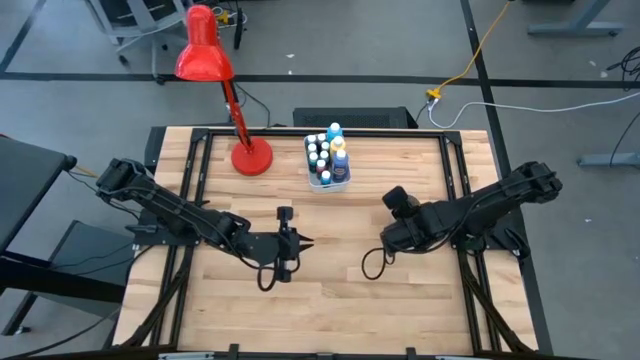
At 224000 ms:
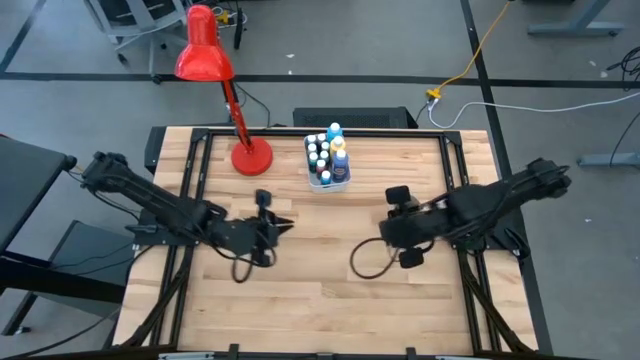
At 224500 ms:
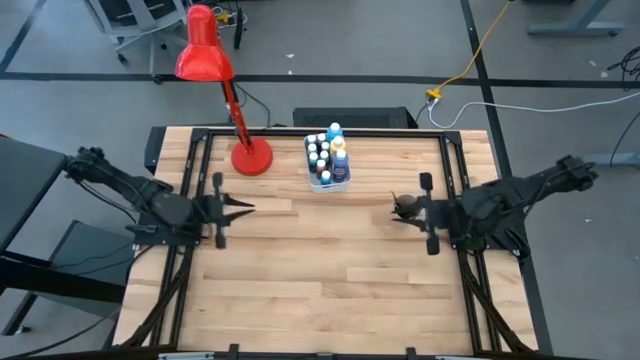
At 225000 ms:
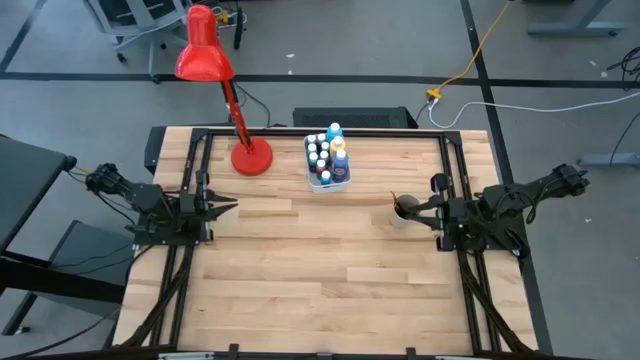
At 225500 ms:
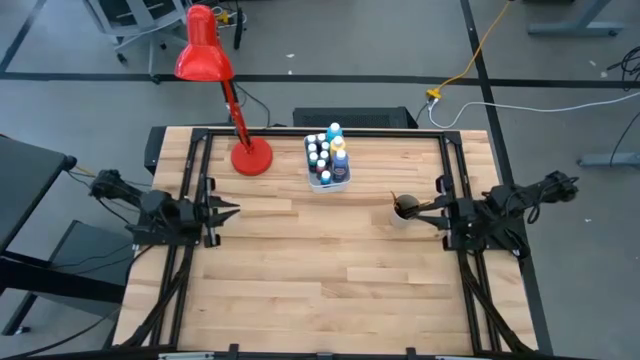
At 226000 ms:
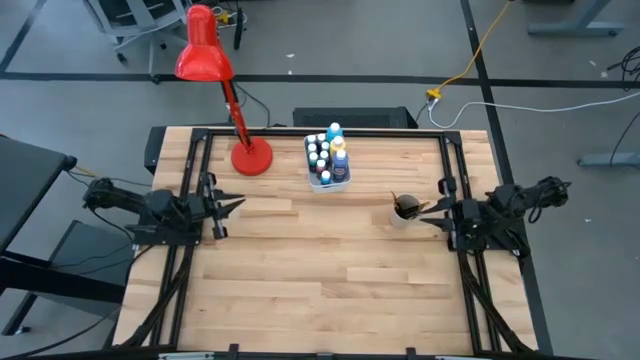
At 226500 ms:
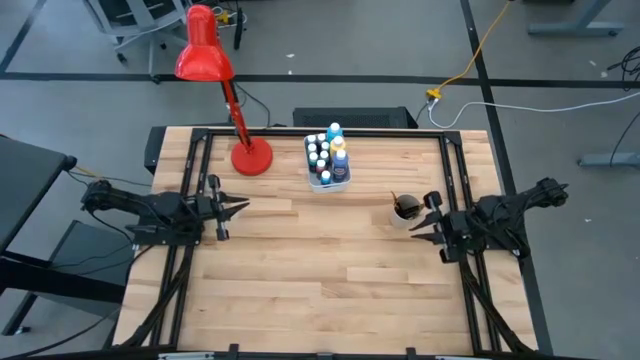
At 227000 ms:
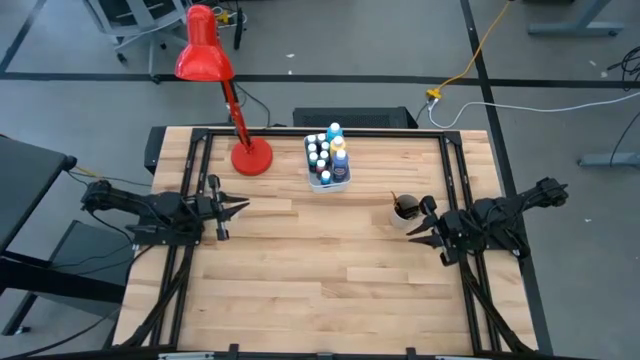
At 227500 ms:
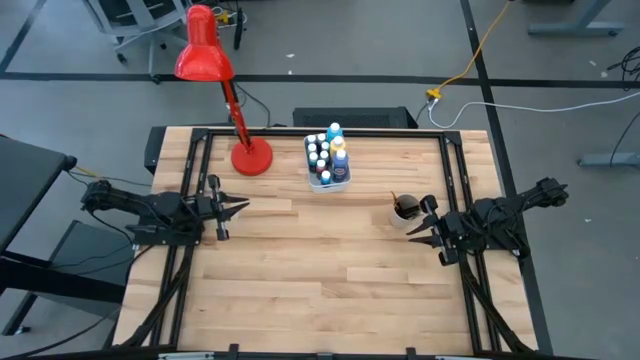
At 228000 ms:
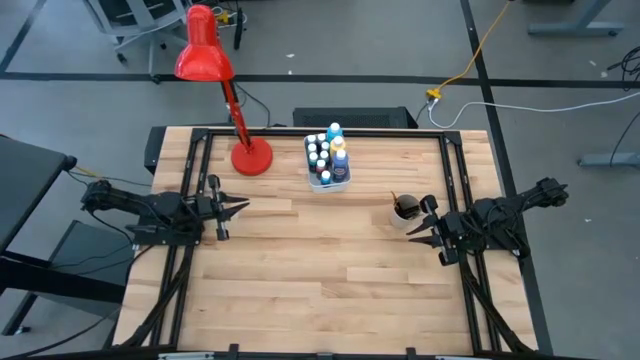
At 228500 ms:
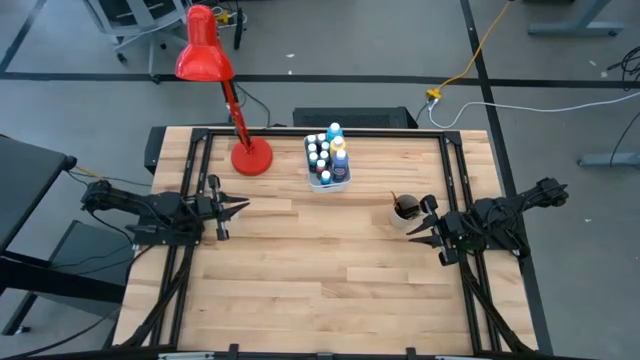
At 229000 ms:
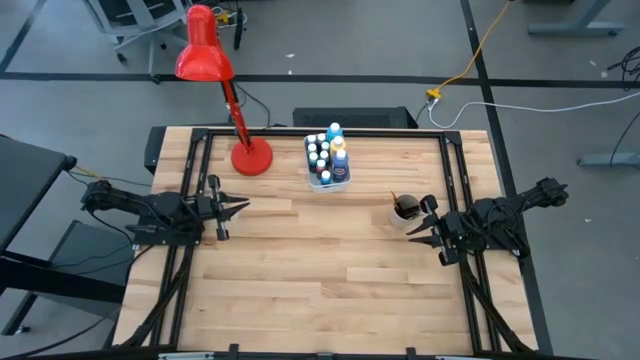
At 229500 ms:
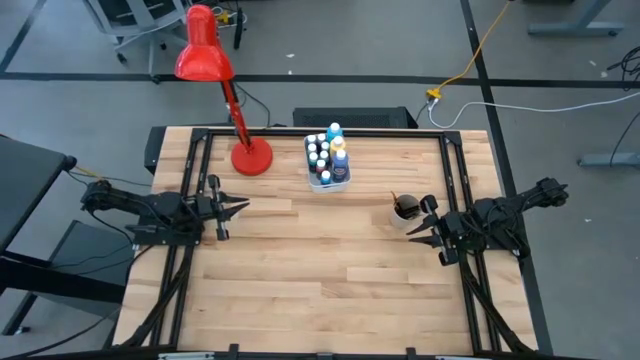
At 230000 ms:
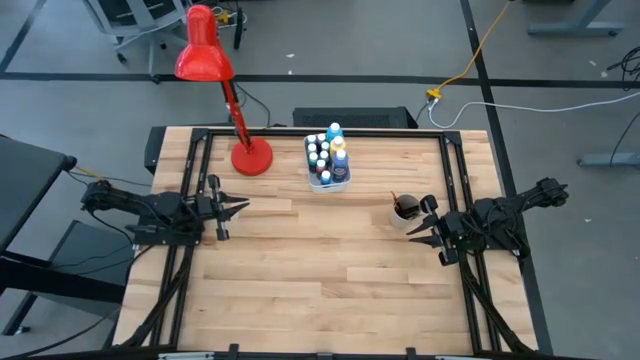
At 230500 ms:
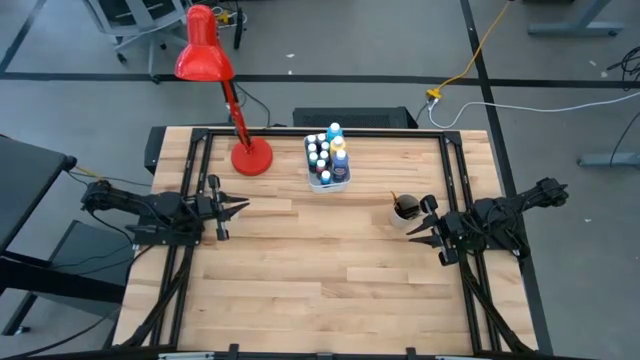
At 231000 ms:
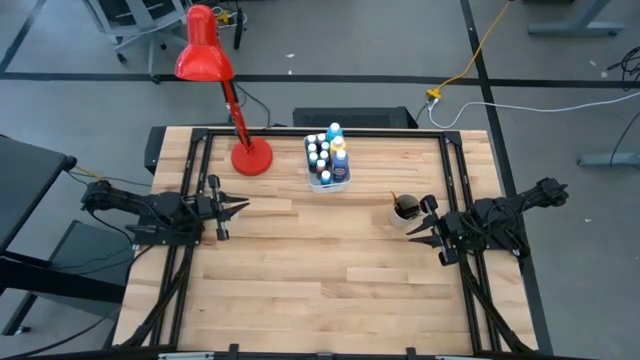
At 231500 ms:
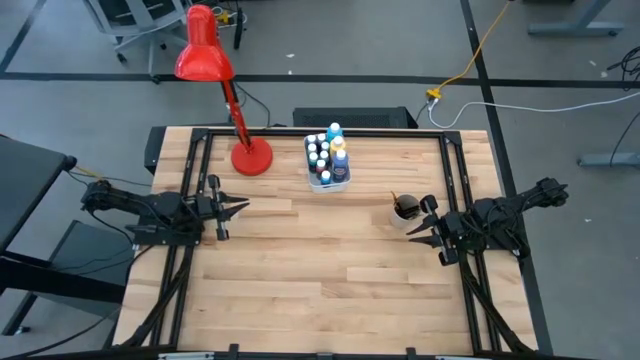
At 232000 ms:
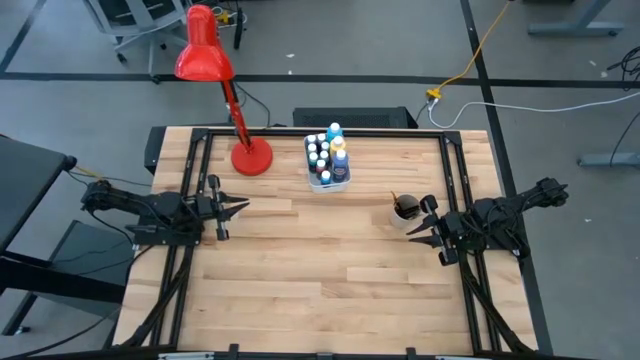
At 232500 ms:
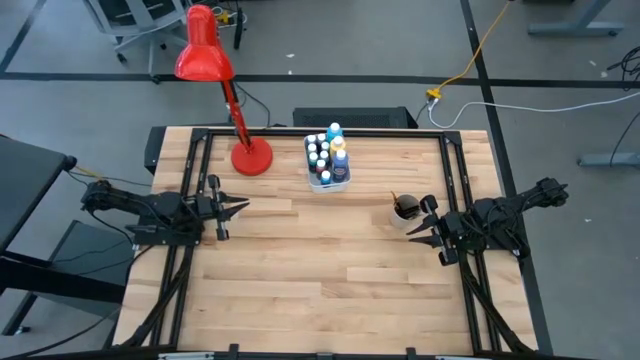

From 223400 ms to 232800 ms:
Task: Pick & Place Paint Supplies
Return to Home Position

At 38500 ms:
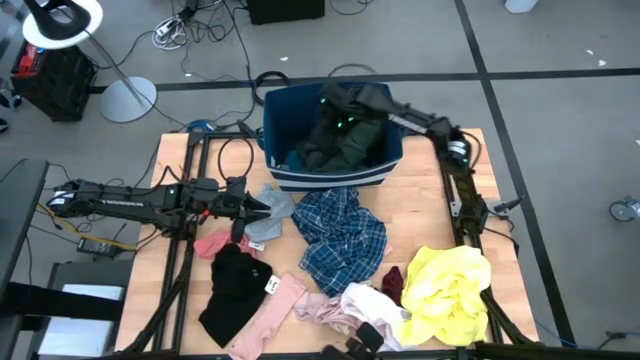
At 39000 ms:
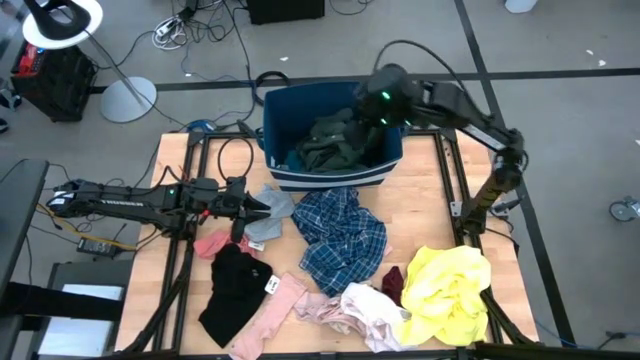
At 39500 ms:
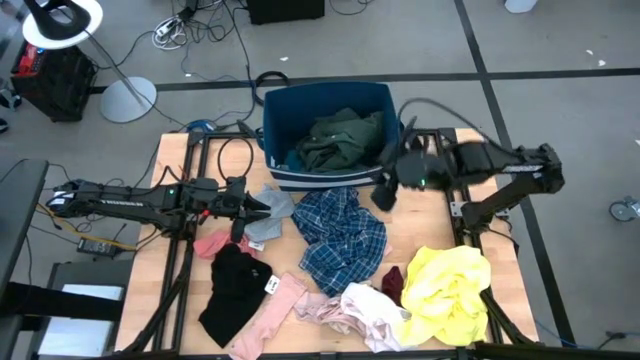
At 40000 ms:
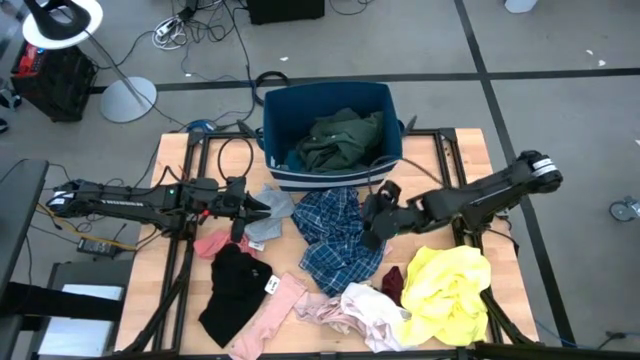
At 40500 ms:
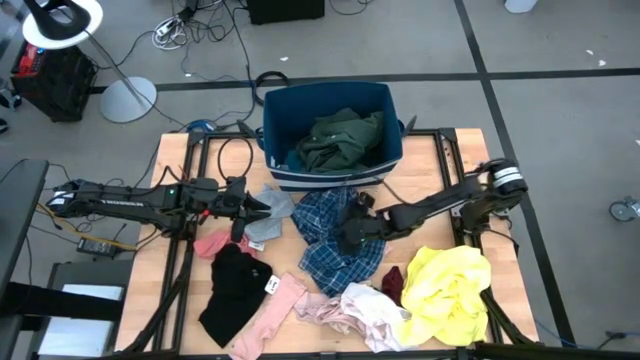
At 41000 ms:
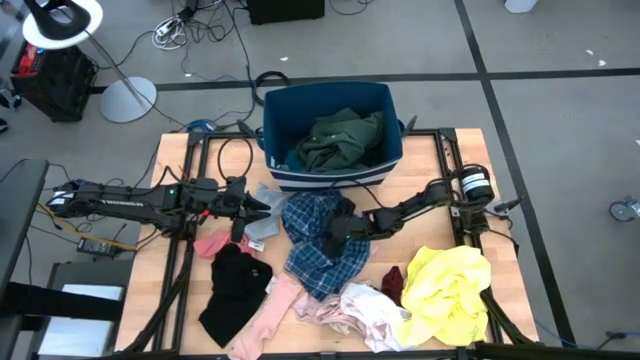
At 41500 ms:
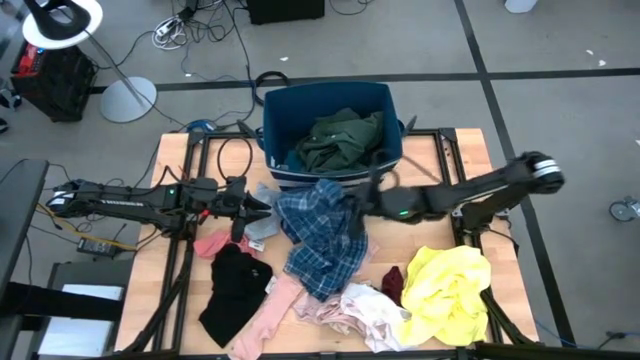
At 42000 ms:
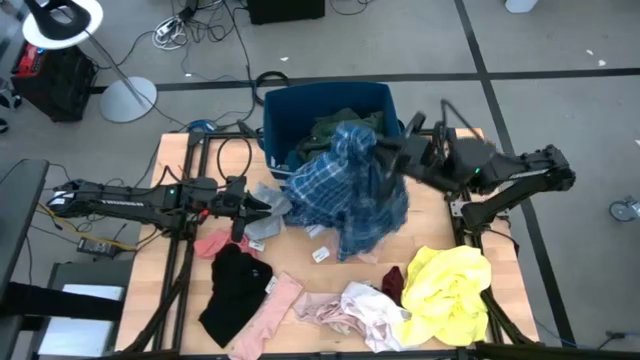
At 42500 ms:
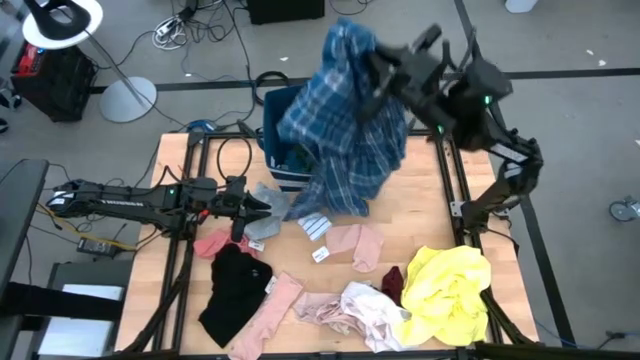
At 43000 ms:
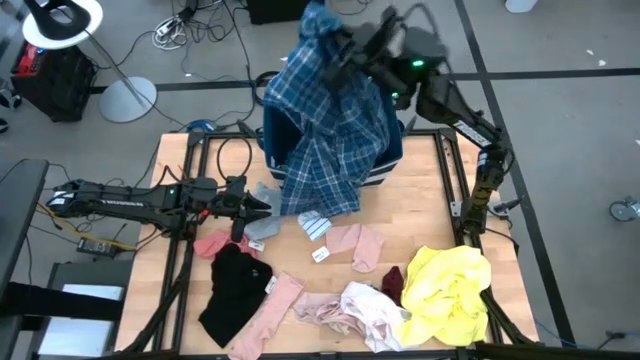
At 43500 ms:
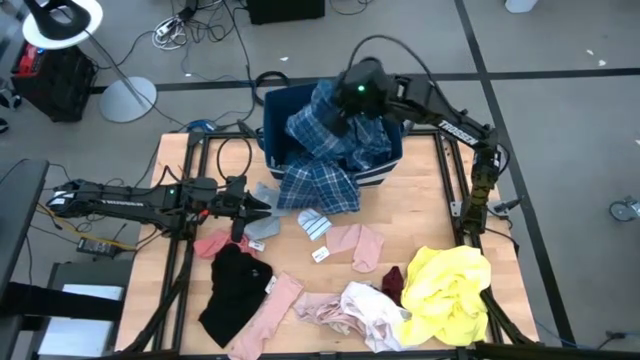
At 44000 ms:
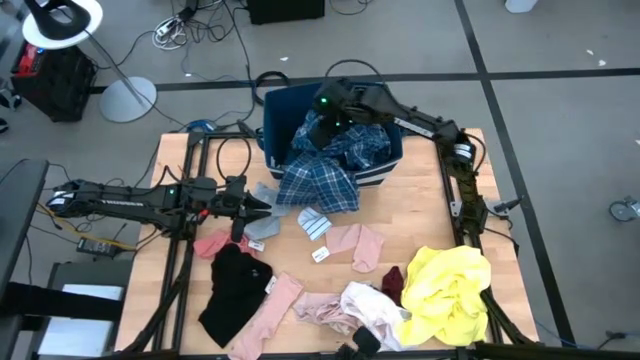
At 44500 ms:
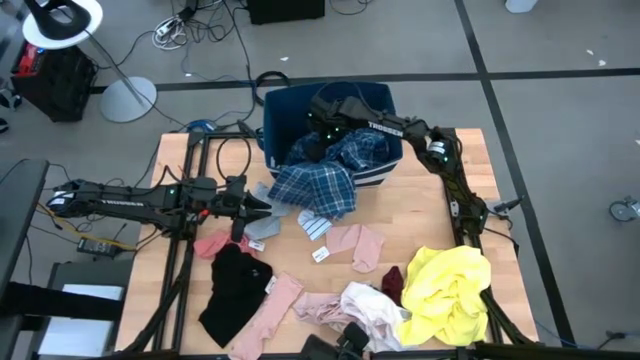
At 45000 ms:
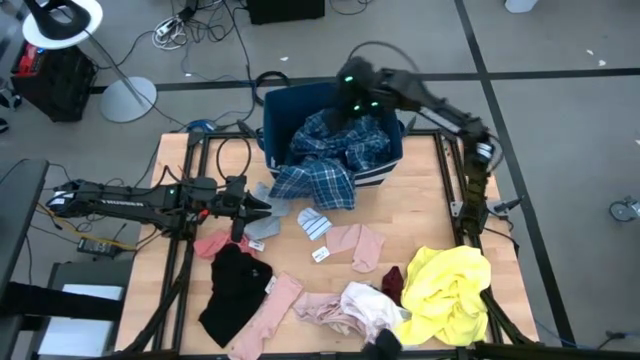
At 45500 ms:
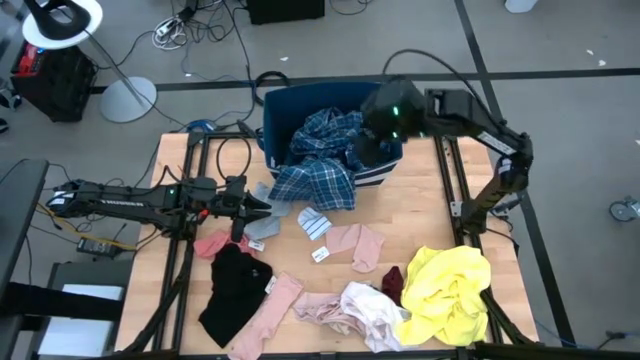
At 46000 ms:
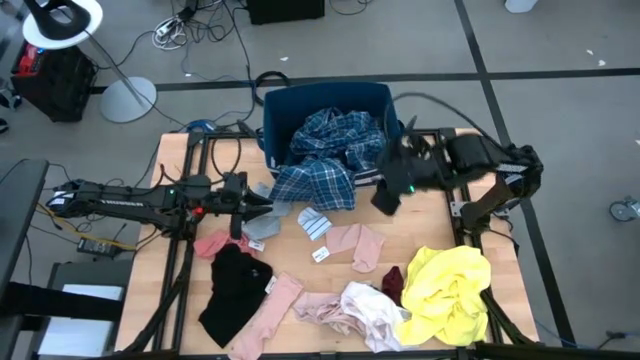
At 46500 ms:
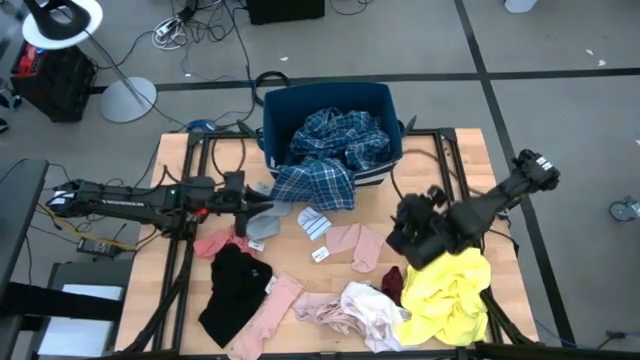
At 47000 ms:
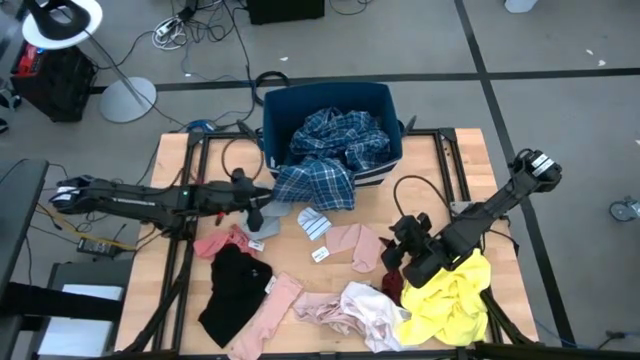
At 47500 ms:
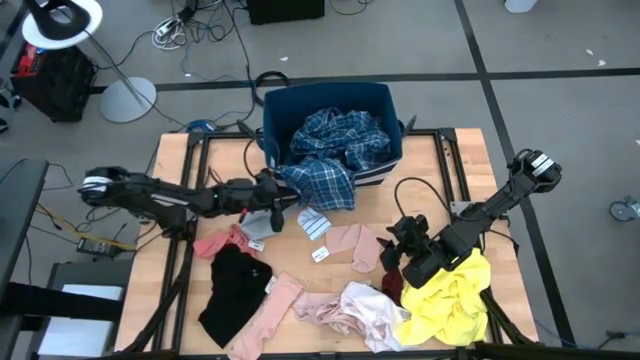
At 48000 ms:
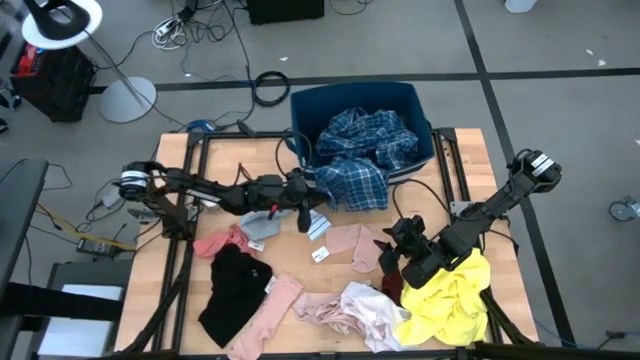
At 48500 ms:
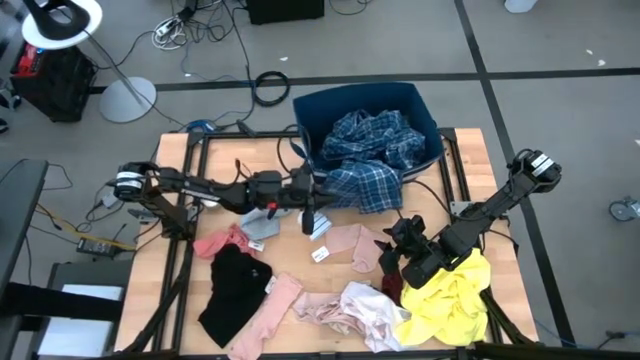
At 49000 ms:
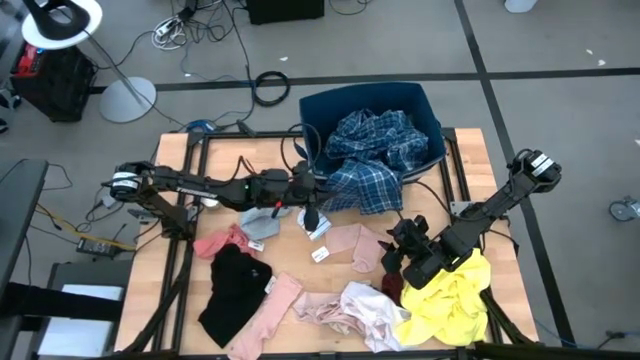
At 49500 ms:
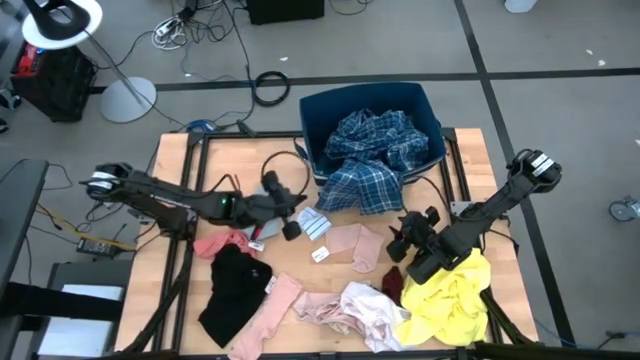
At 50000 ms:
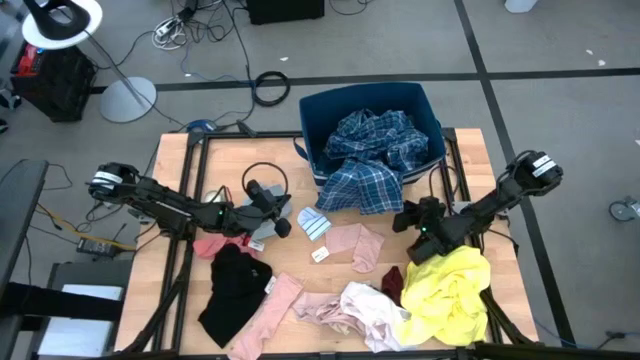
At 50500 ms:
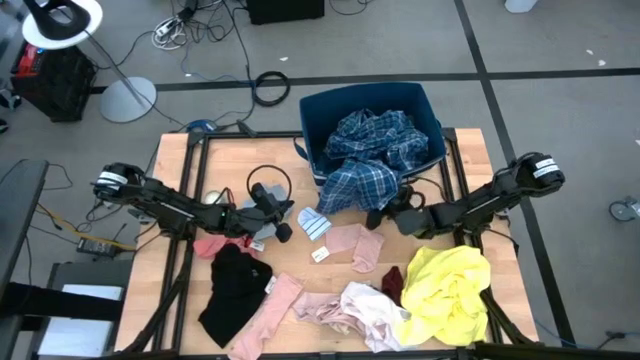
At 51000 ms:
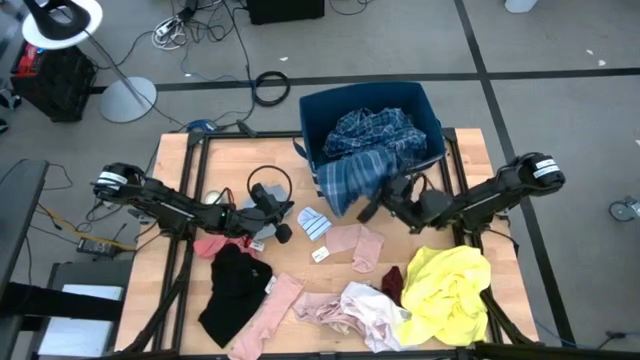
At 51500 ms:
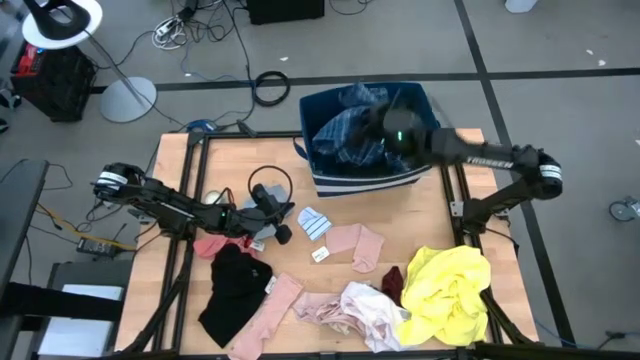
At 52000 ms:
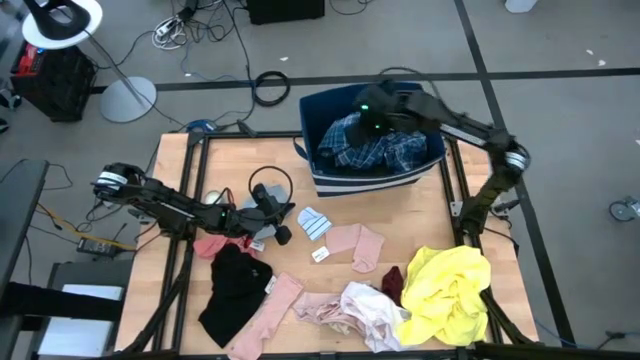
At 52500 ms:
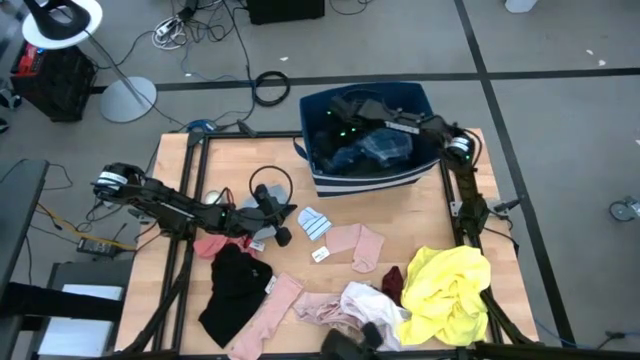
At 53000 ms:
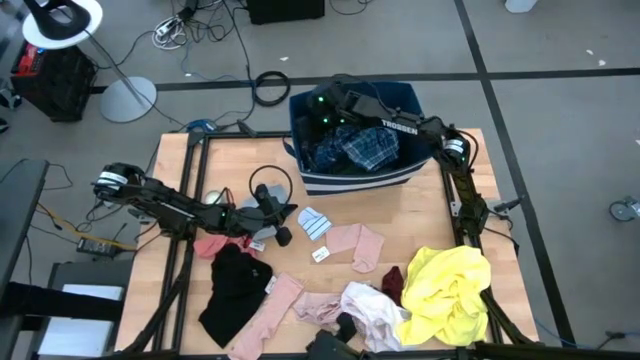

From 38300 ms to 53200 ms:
Task: Sort clothes
Put the blue checkered shirt into the blue laundry bin
